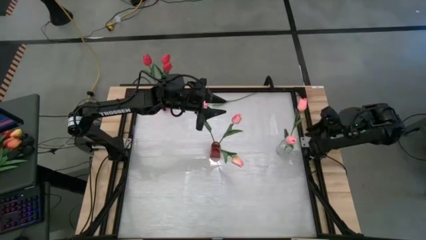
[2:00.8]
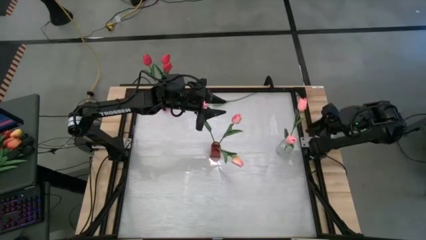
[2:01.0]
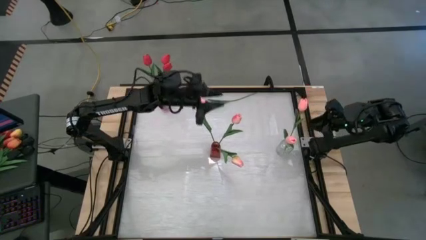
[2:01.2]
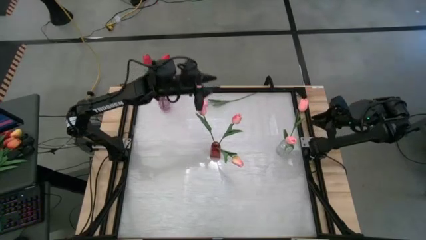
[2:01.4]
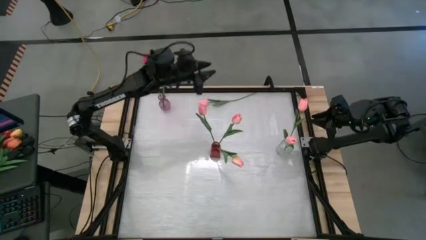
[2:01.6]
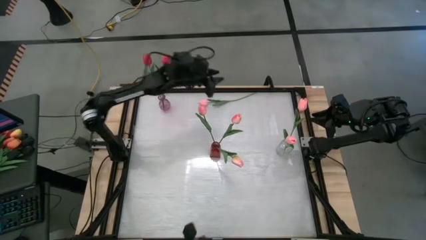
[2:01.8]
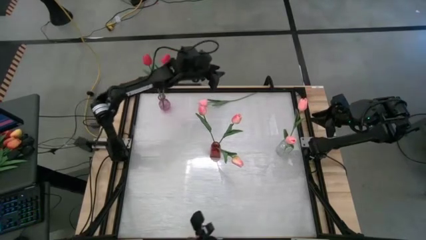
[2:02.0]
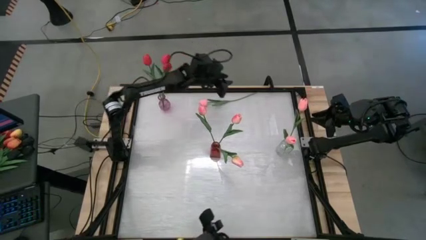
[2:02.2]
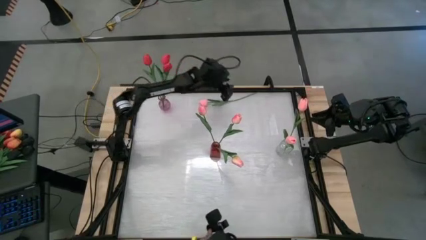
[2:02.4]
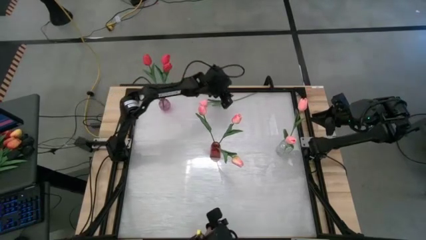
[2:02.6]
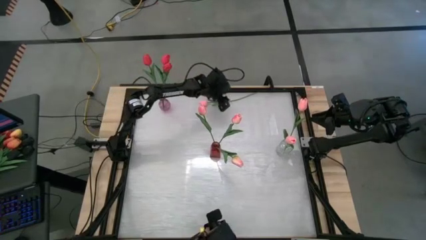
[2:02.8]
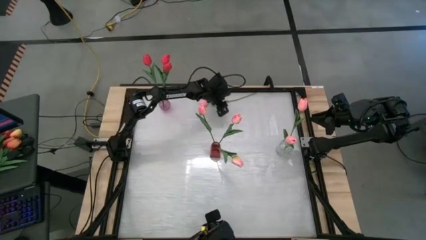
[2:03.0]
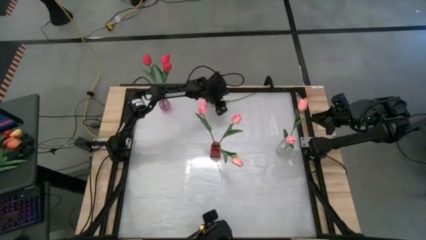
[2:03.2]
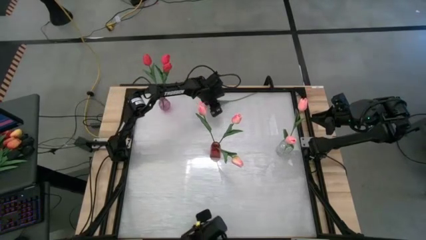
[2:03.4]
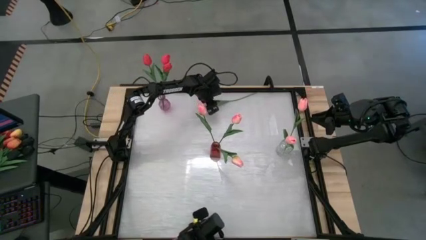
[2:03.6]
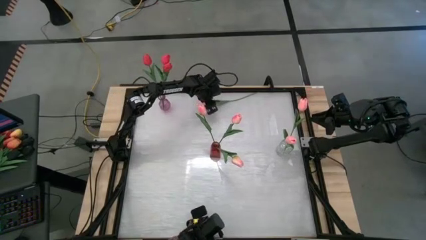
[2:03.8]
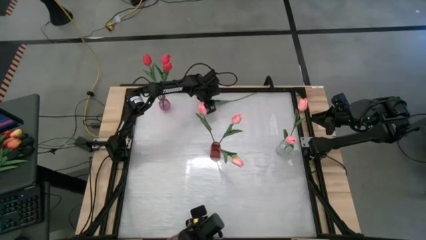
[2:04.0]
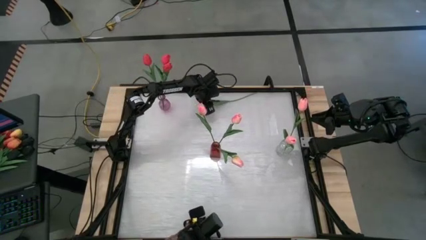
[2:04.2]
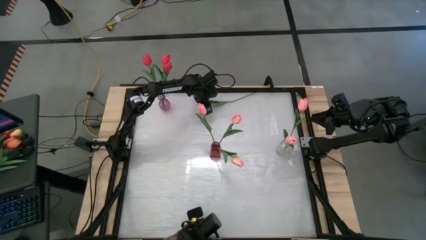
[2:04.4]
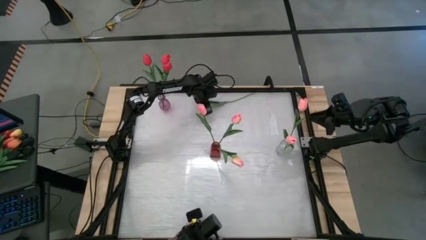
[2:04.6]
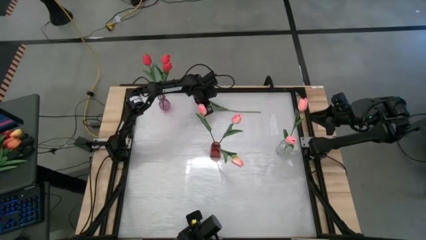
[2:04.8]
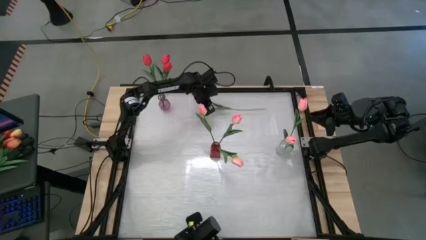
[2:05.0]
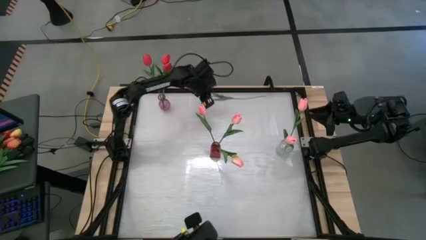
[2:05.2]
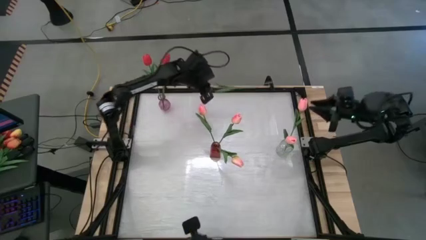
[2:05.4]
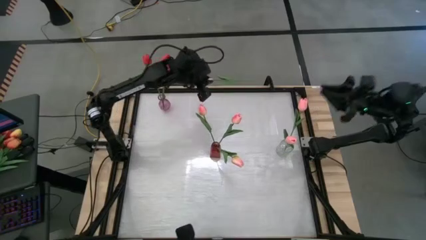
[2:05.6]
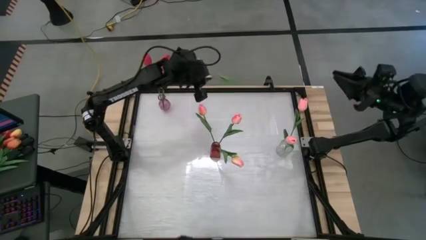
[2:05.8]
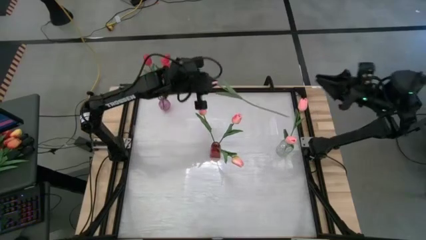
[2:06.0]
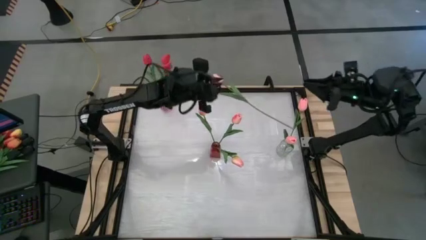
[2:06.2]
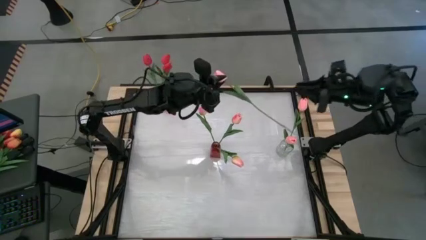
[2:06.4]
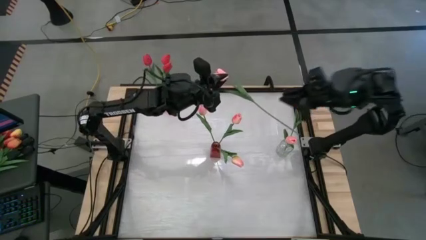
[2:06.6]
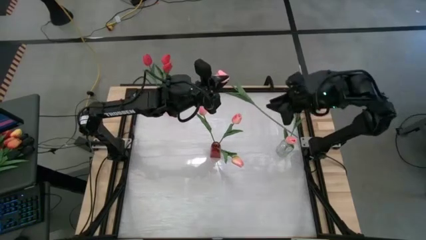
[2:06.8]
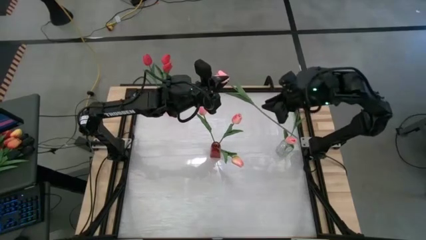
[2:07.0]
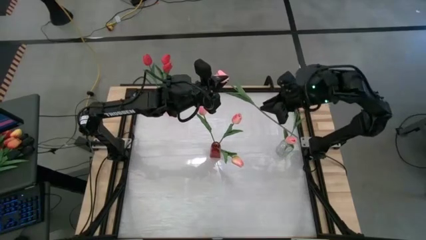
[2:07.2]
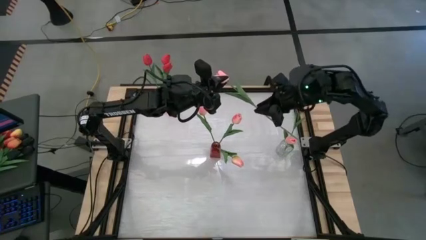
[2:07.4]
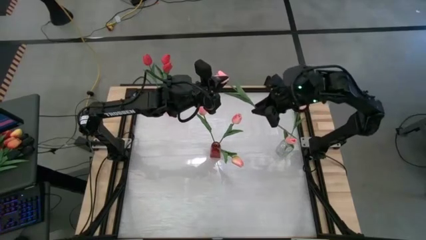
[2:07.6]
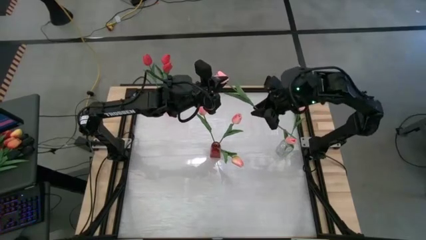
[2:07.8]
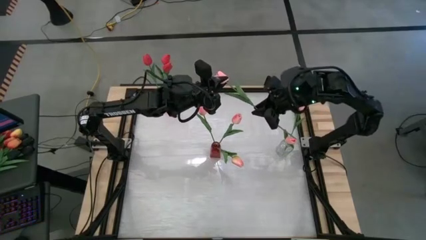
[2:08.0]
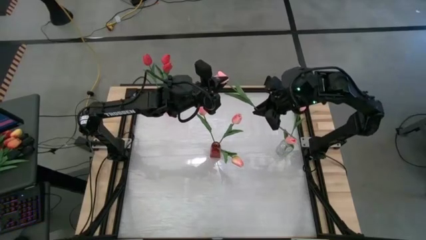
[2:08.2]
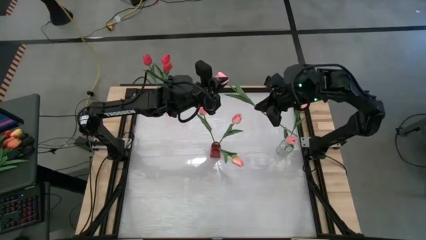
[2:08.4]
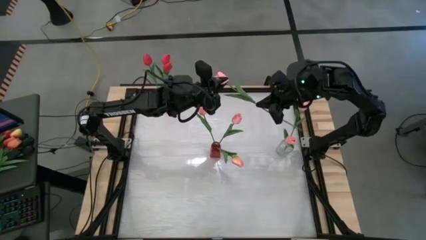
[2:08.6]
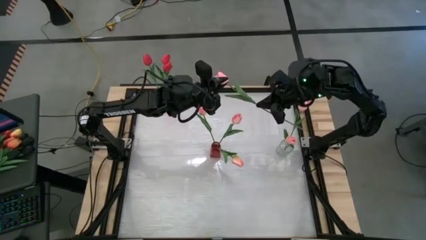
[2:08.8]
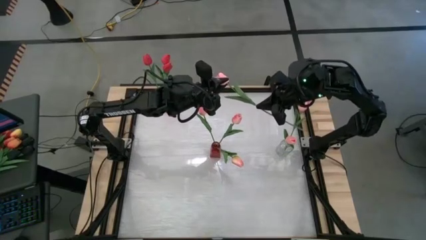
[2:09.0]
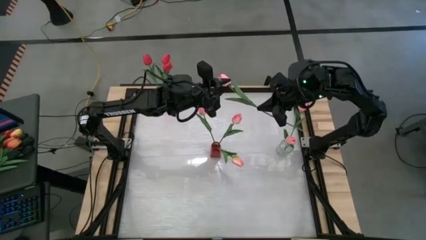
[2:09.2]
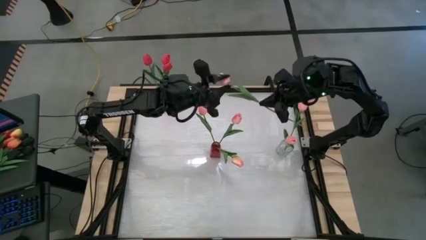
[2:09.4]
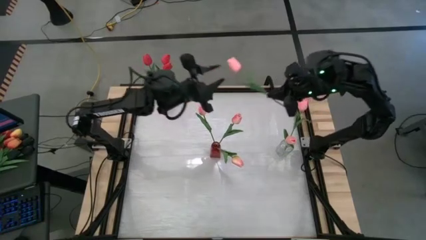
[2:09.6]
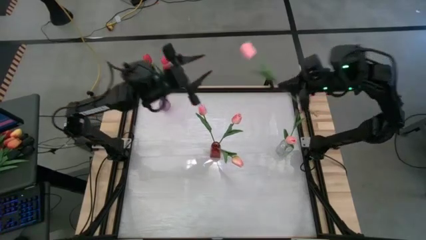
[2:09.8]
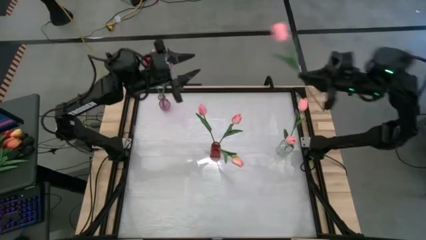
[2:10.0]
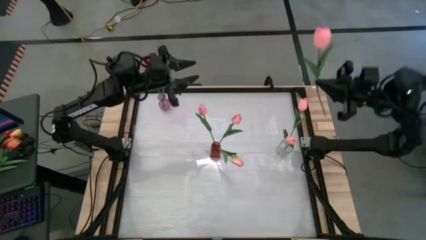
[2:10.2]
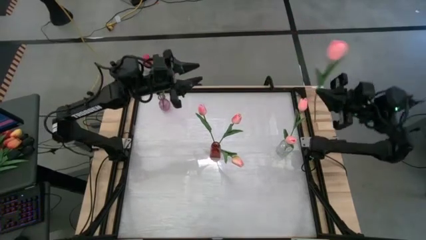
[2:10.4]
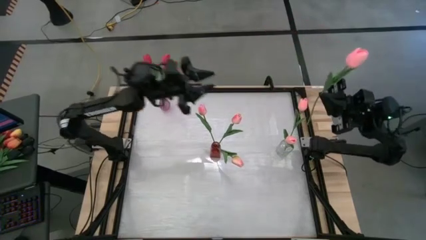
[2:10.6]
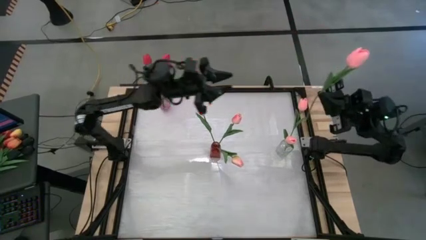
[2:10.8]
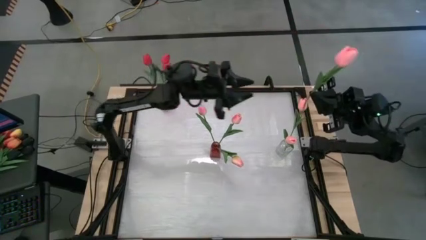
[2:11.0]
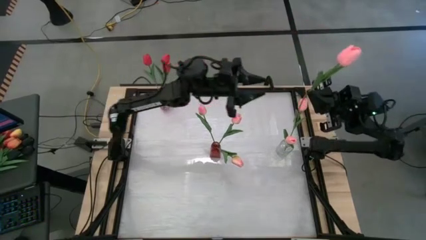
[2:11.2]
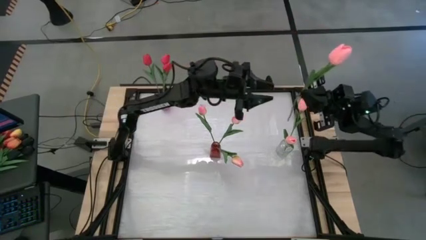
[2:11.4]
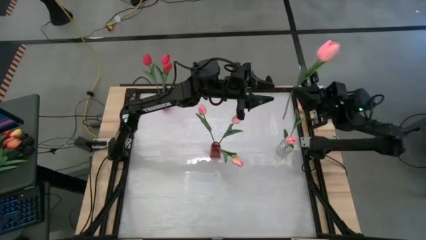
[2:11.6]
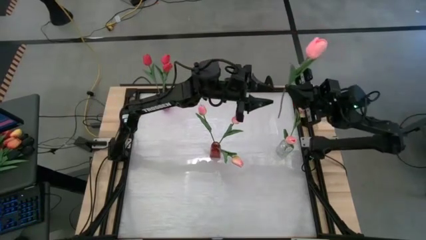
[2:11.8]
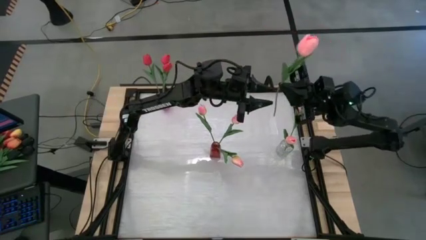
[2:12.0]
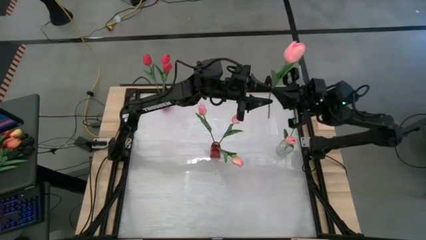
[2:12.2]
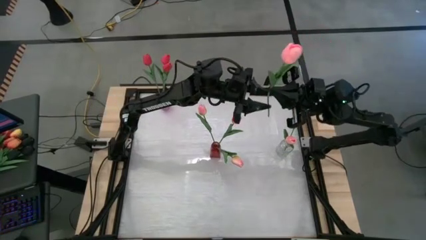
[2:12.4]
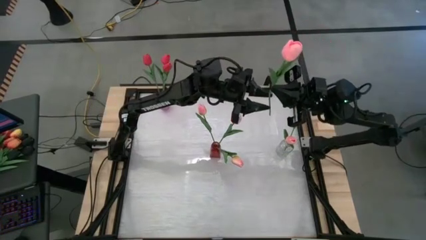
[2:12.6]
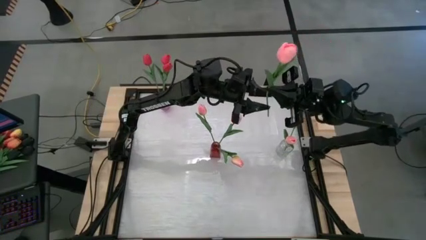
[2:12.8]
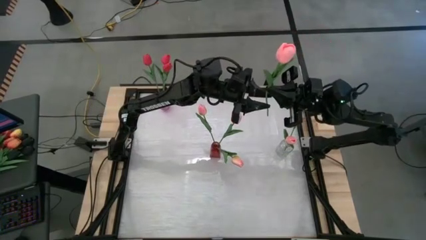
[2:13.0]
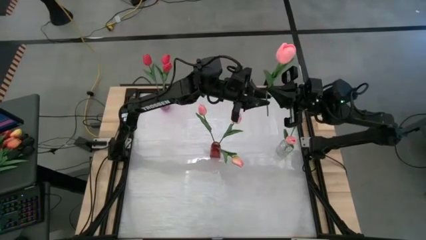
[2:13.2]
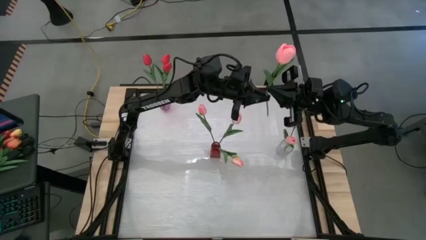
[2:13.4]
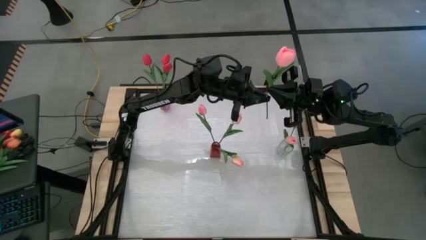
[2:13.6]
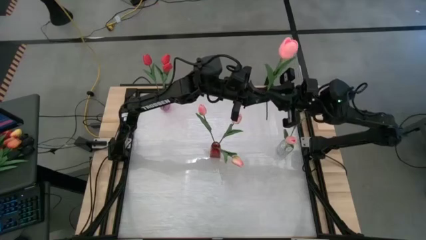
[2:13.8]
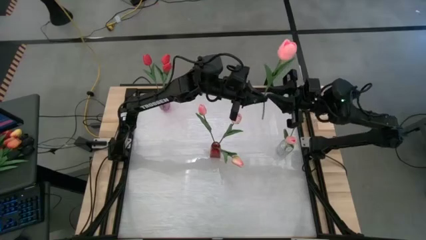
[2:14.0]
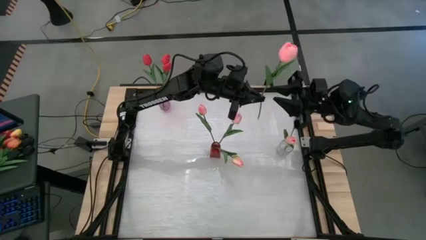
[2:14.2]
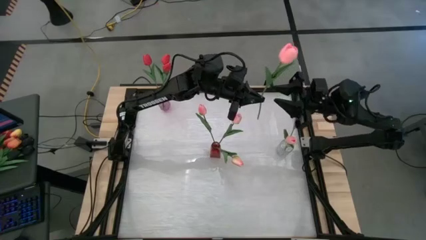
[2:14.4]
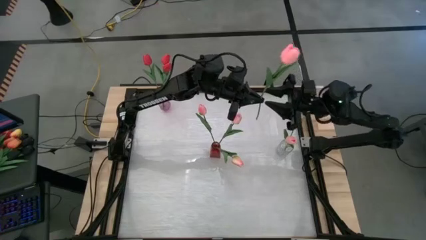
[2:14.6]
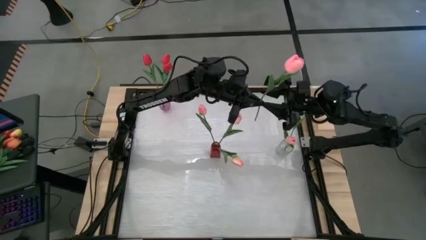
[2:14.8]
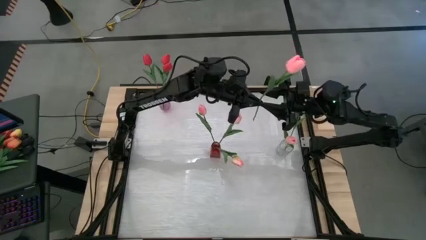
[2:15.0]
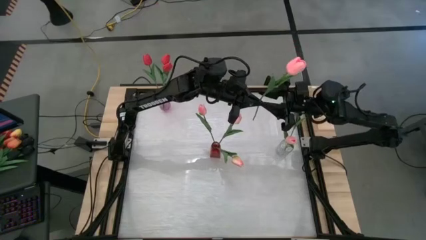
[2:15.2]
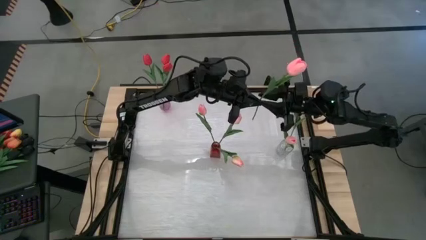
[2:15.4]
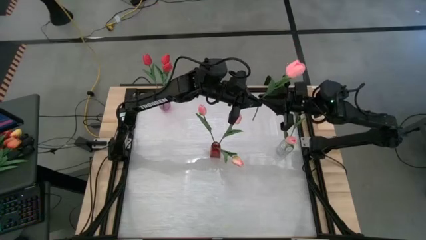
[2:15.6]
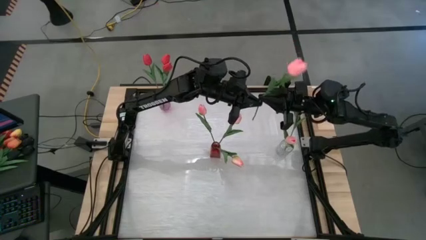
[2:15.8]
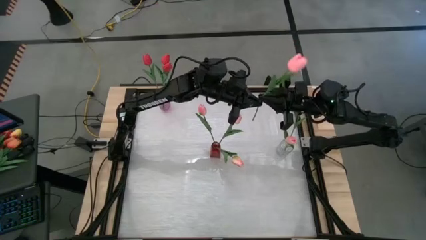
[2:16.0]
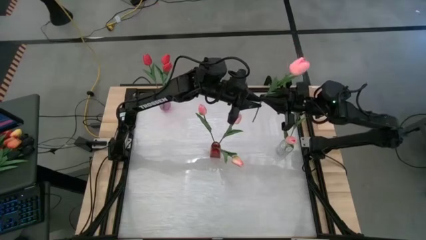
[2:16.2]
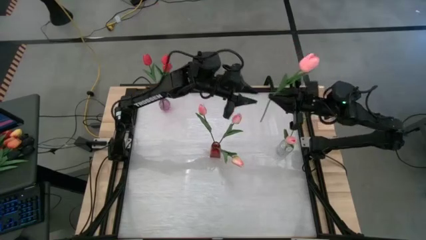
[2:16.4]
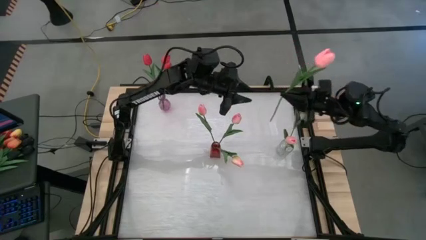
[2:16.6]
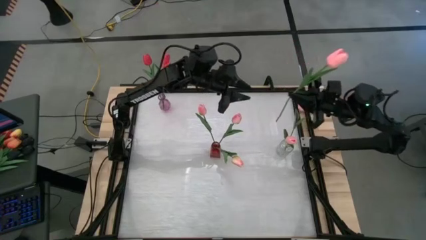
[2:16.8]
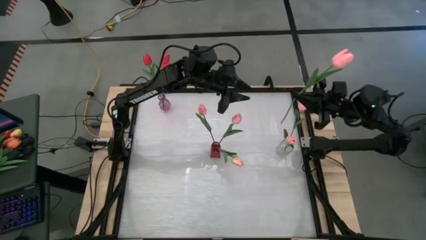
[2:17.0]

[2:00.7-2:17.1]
Task: Sort flowers into vase by color
Put the pink tulip into the transparent vase
